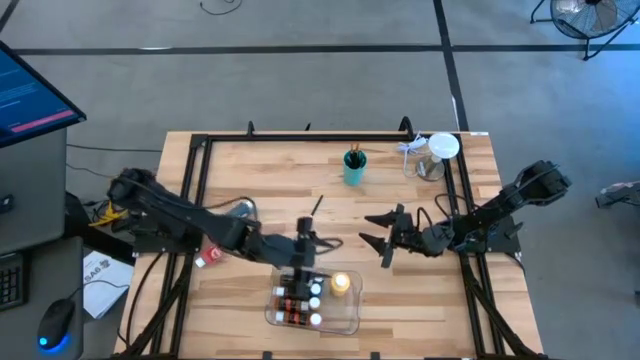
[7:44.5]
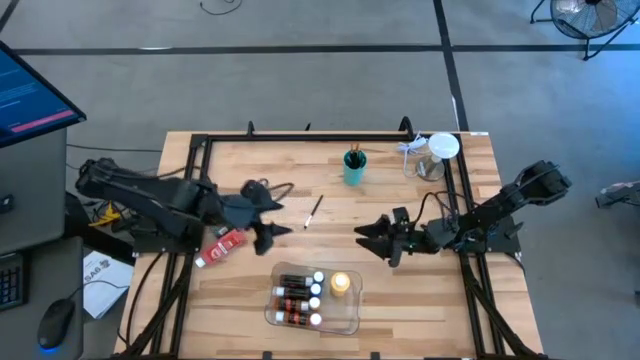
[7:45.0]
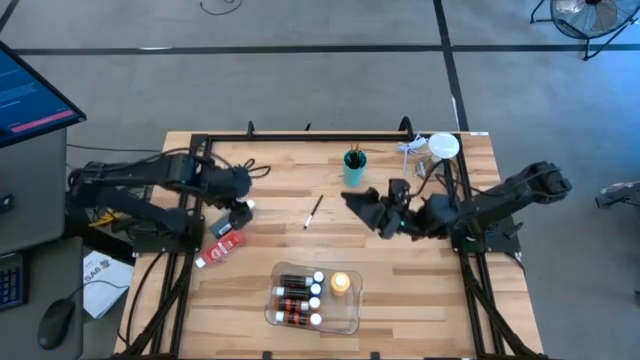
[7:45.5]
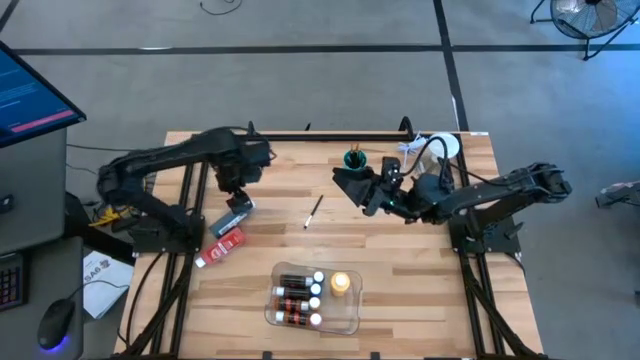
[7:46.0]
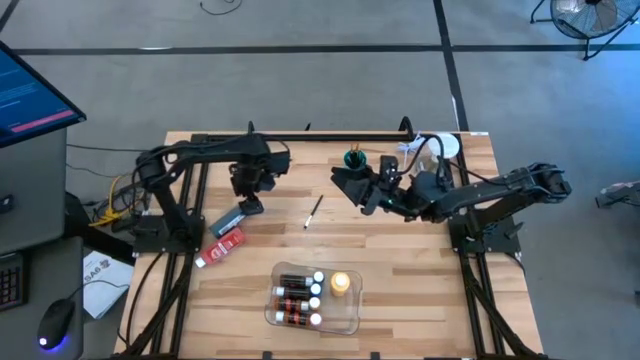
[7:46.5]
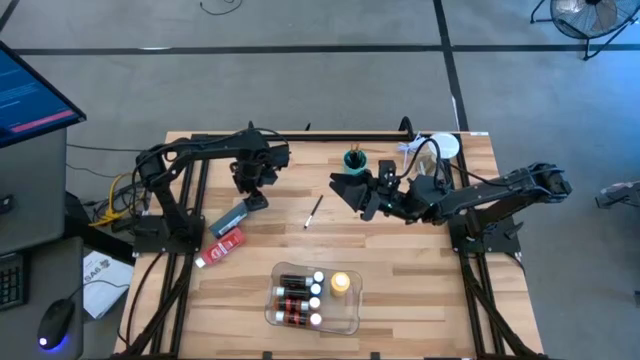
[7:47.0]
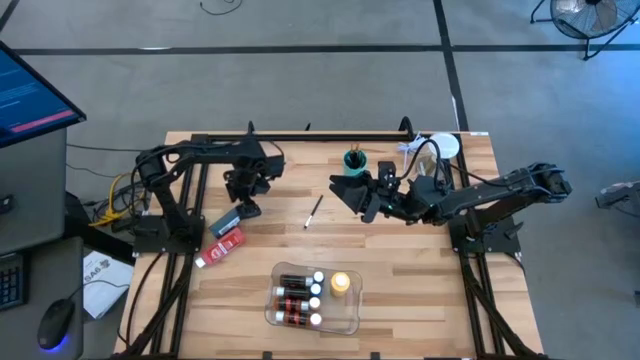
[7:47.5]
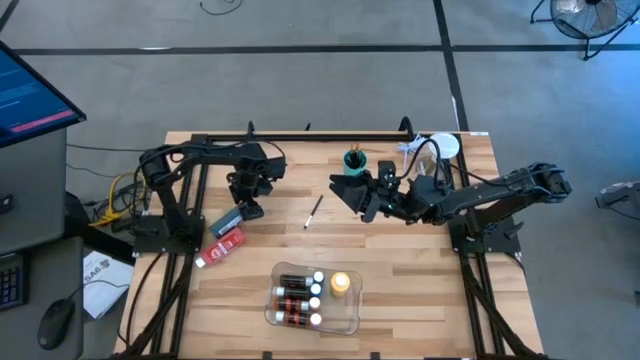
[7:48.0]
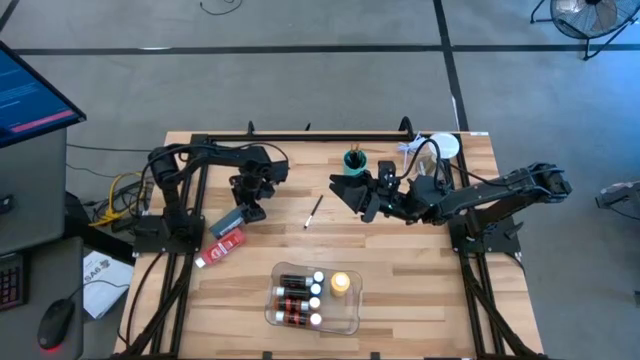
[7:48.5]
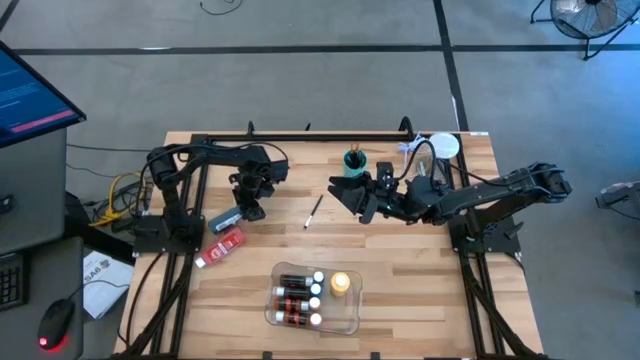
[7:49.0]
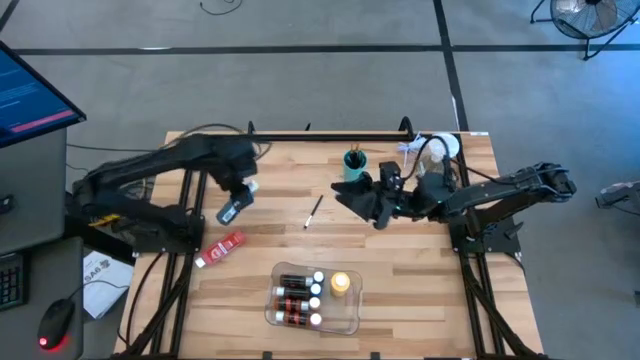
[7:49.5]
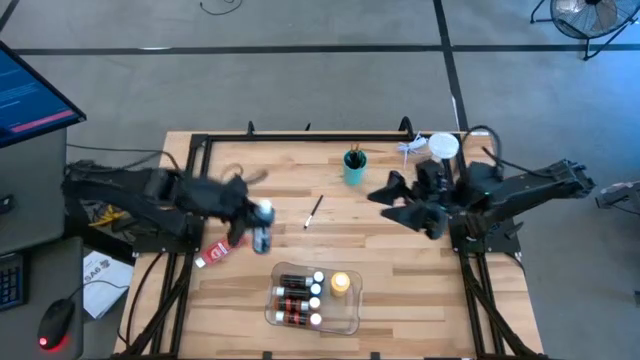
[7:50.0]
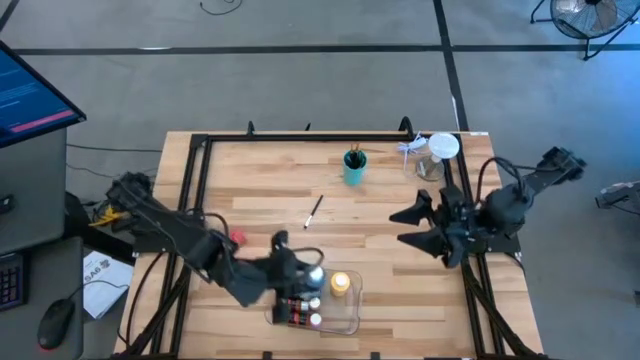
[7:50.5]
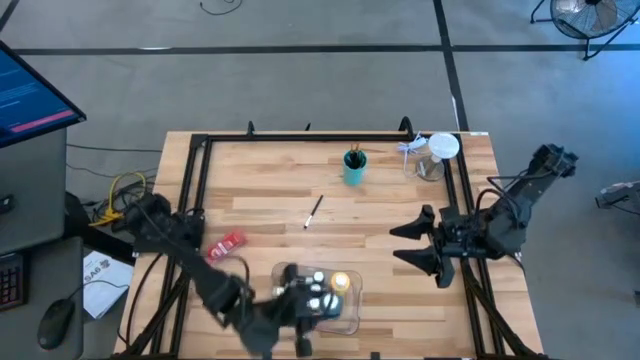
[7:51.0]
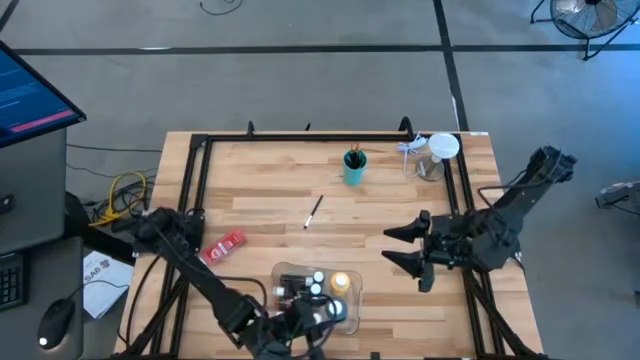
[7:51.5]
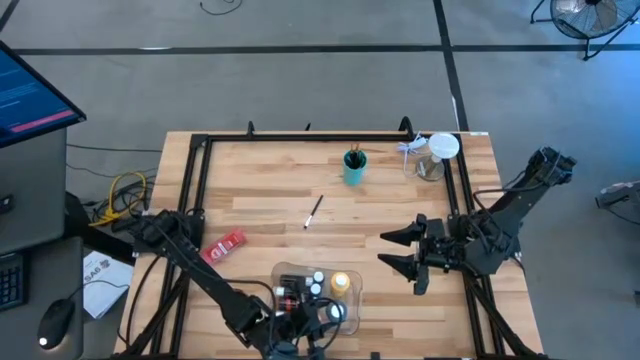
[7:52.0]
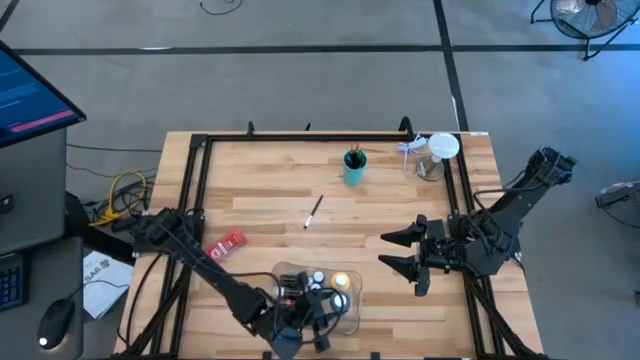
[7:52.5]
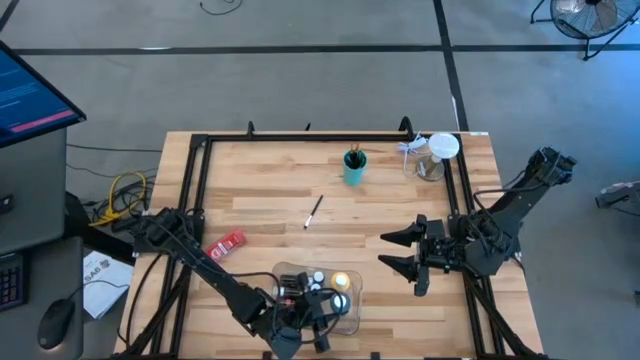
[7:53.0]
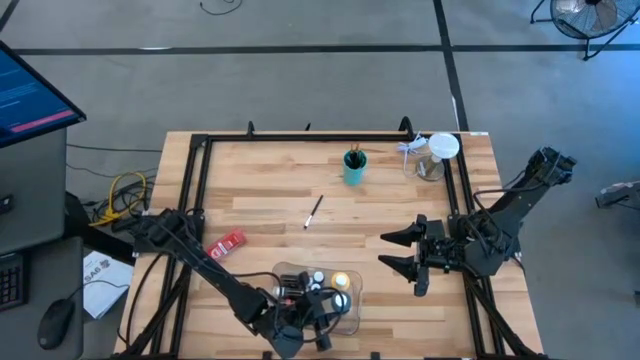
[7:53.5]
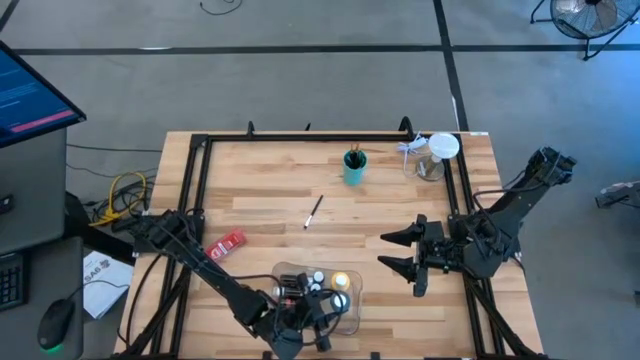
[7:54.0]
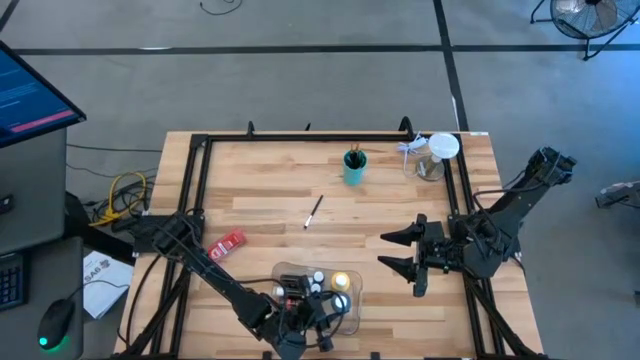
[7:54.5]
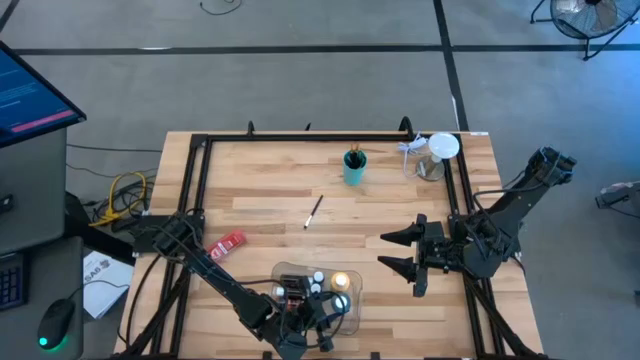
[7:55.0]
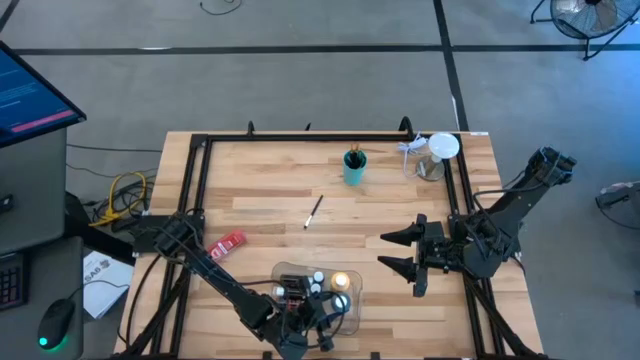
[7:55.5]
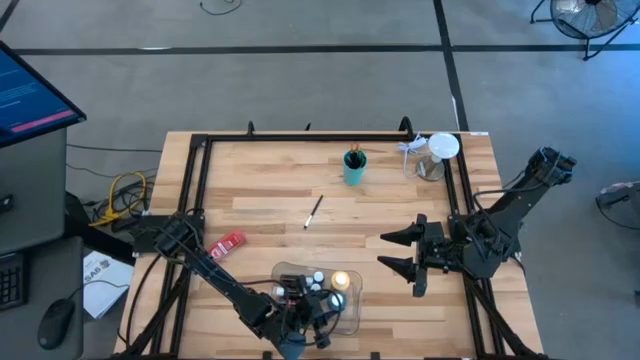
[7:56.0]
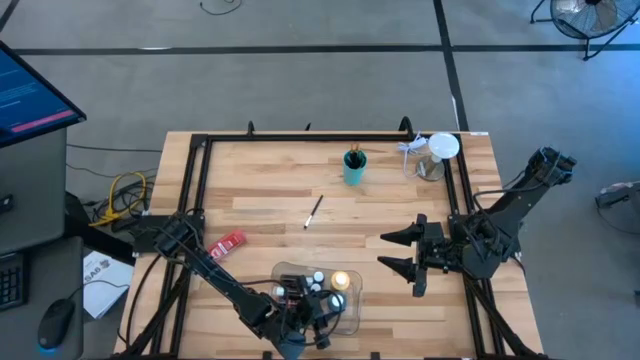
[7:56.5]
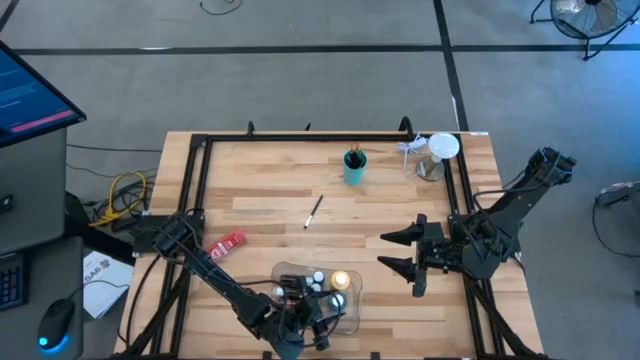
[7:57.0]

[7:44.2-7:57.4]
Task: Pick & Place Paint Supplies
Put the black paint bottle into the transparent bin

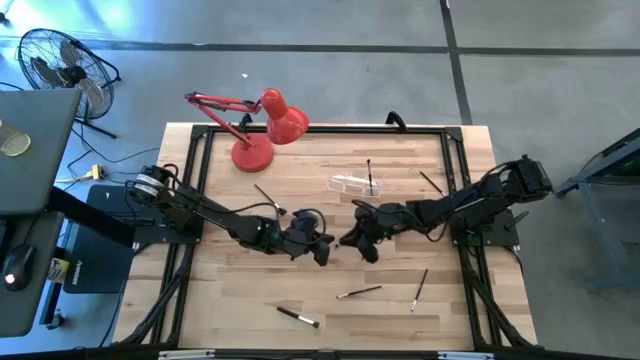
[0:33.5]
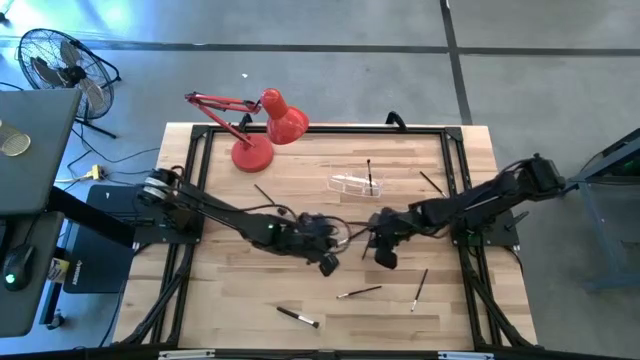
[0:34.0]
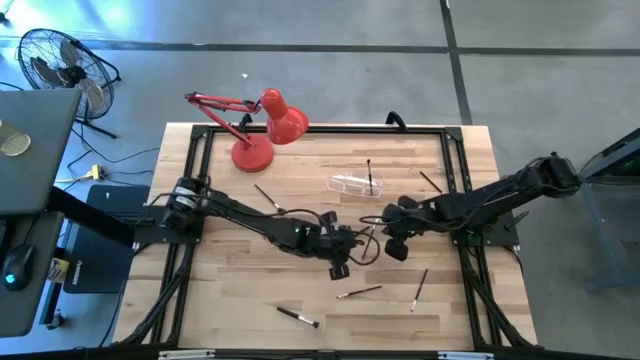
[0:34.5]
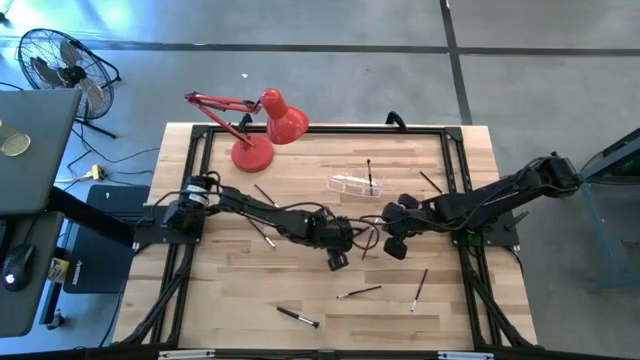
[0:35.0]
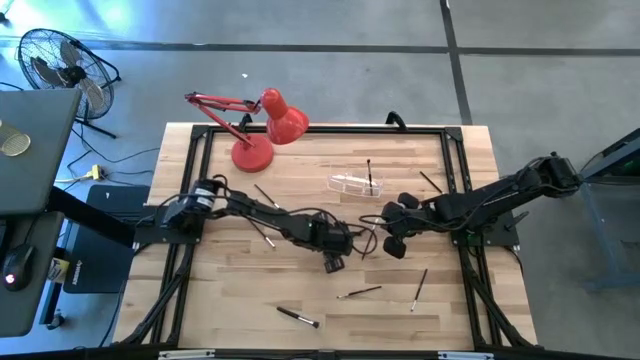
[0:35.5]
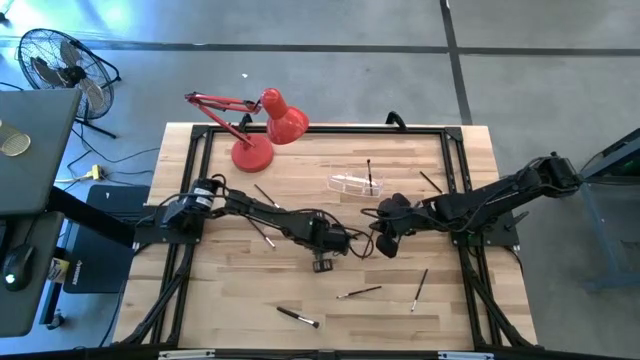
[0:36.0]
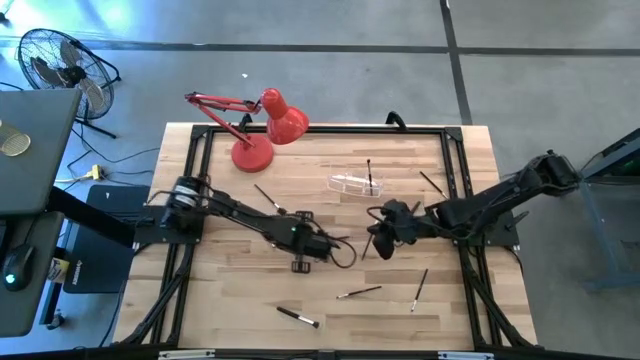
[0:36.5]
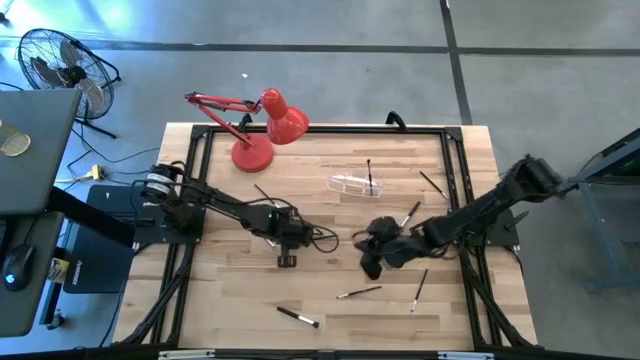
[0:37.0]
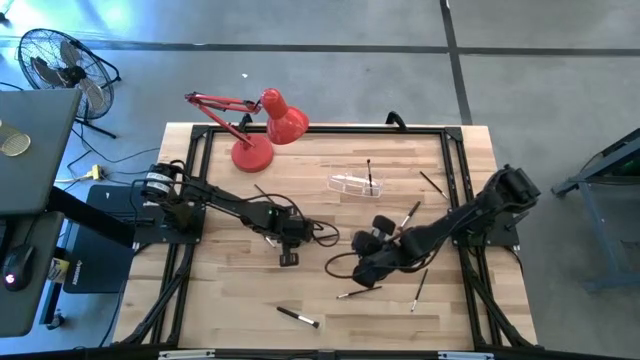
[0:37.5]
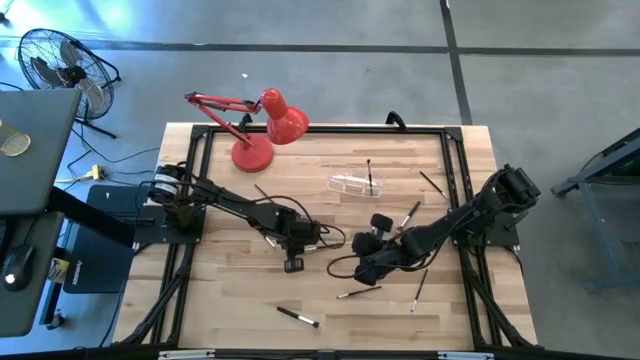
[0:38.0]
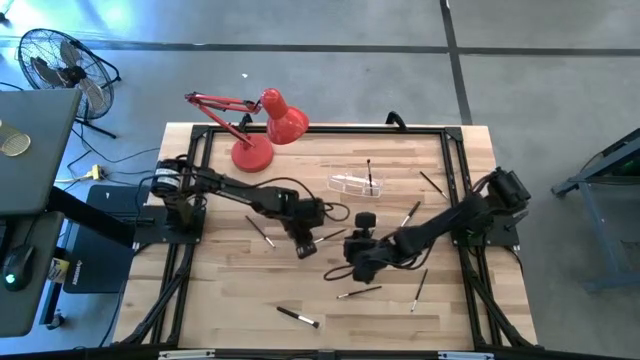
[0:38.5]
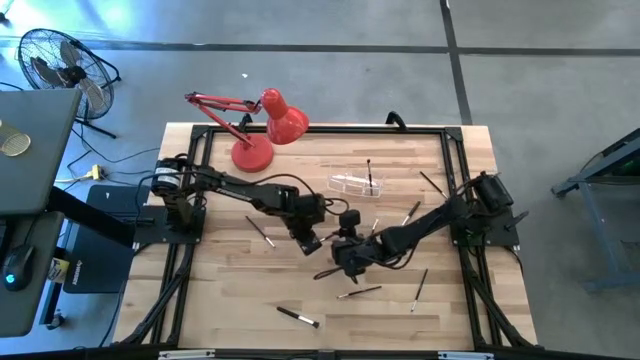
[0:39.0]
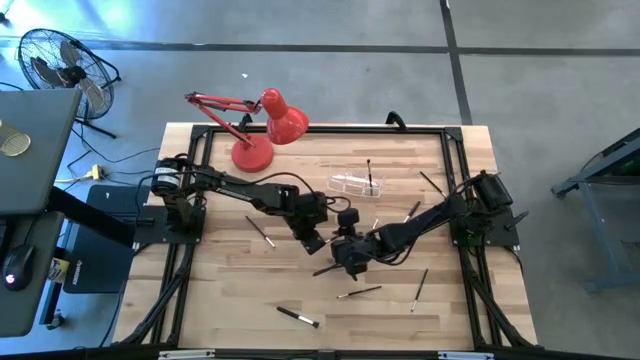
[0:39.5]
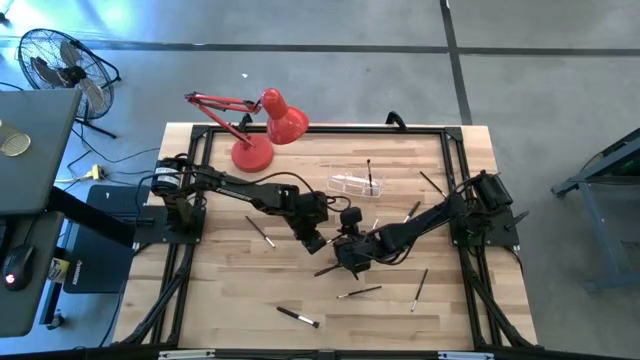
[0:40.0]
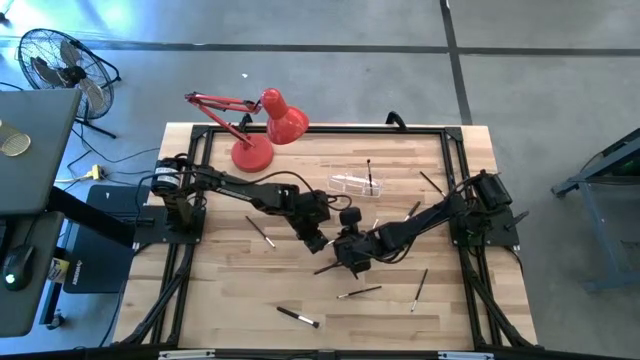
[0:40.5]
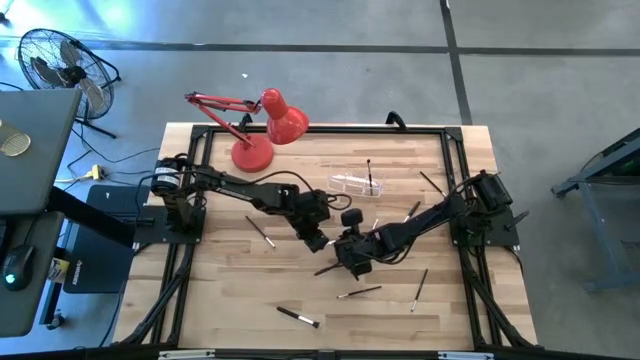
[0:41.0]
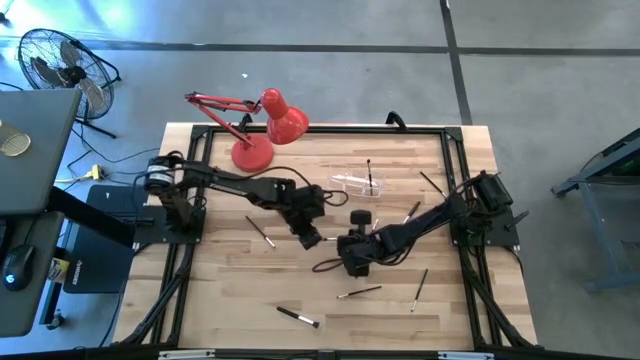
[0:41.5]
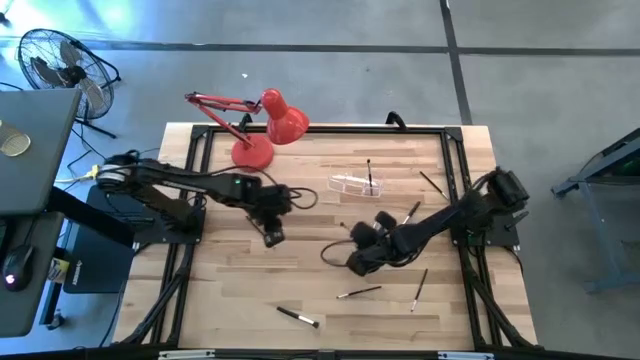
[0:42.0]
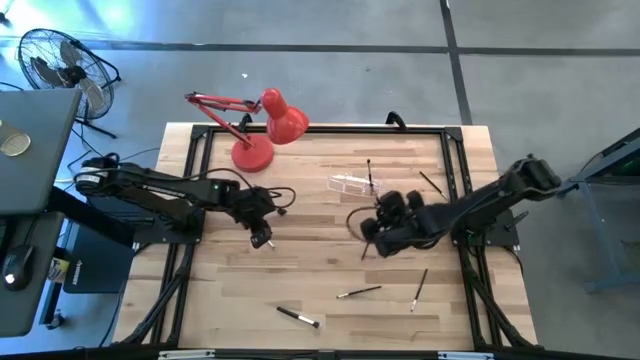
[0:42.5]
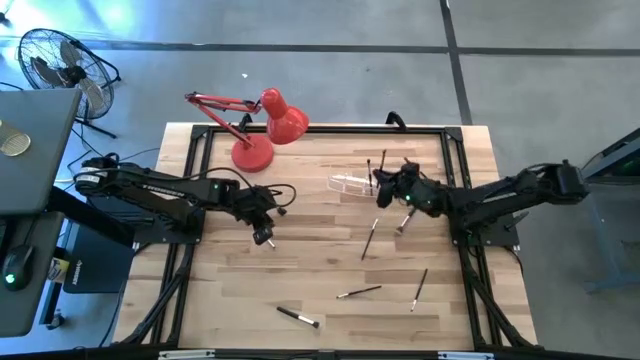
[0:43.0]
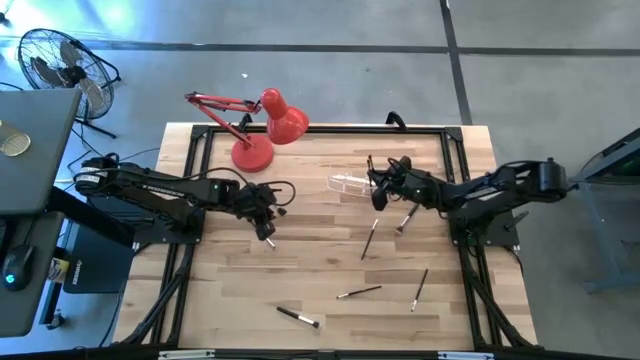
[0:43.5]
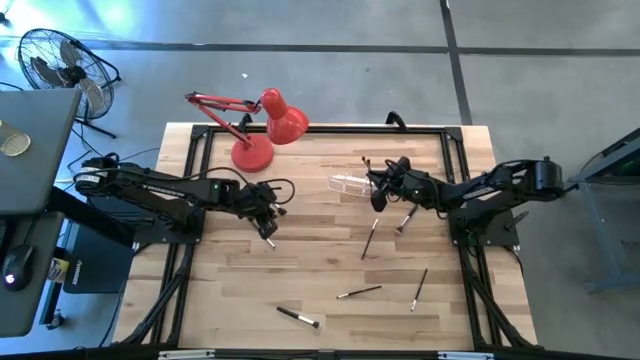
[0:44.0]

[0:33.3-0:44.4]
Task: Put items in baskets/containers
Put the eyeshadow brush into the transparent organizer
